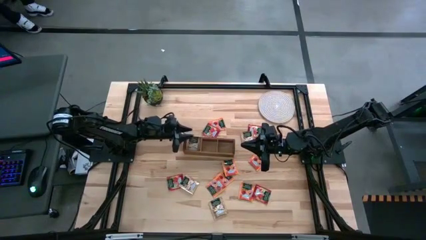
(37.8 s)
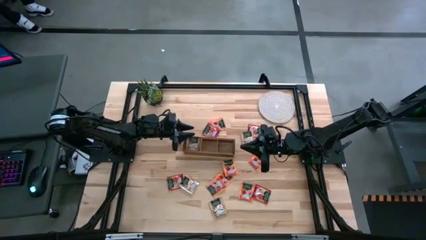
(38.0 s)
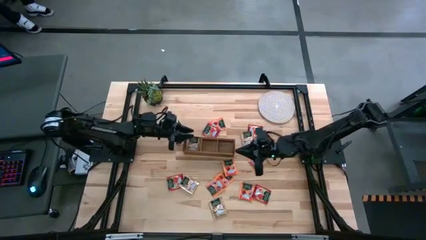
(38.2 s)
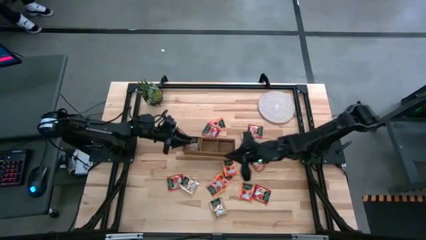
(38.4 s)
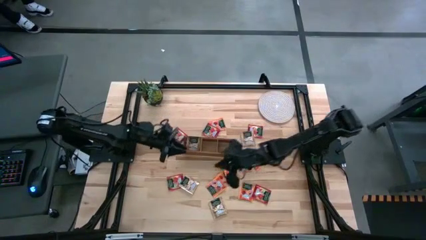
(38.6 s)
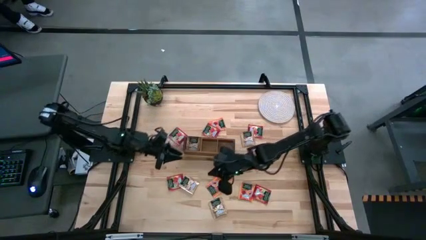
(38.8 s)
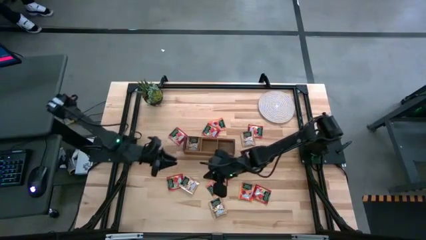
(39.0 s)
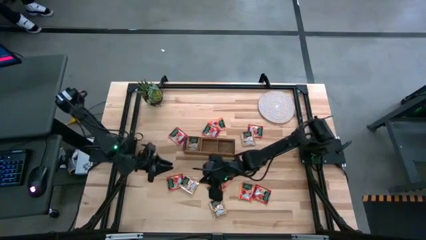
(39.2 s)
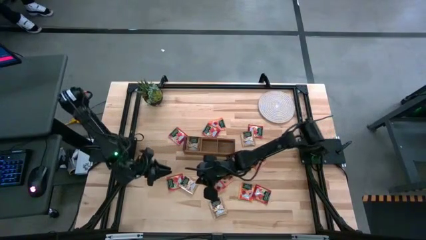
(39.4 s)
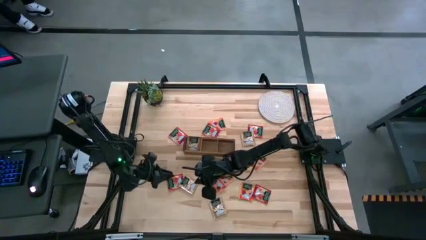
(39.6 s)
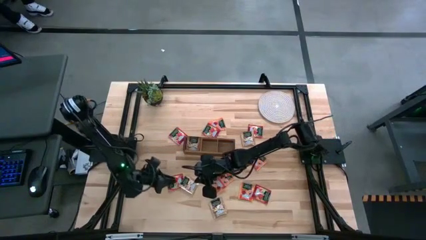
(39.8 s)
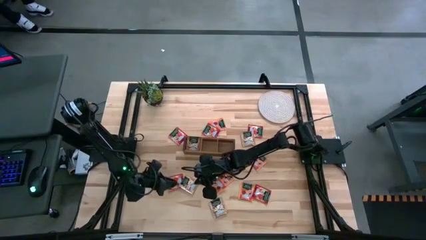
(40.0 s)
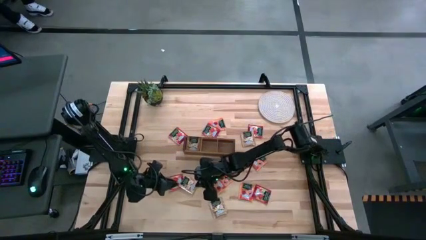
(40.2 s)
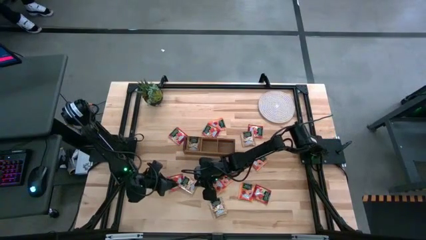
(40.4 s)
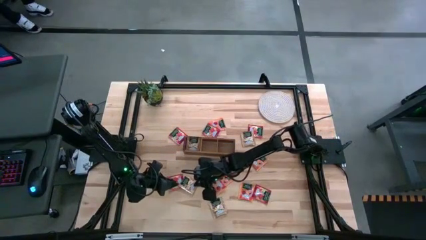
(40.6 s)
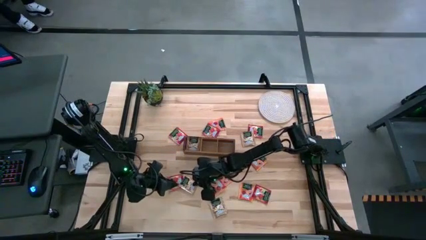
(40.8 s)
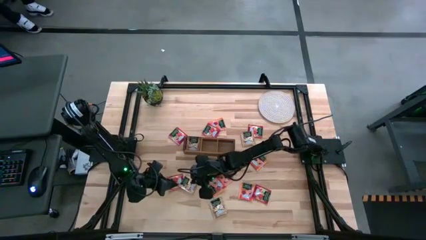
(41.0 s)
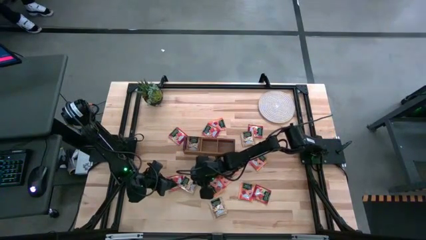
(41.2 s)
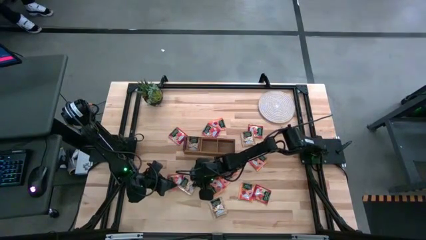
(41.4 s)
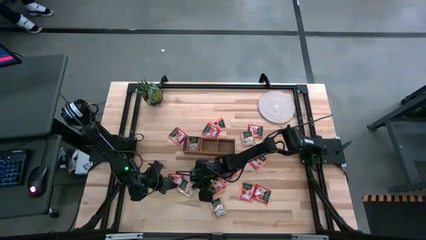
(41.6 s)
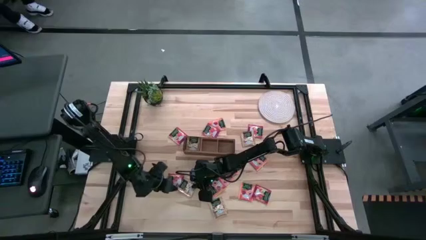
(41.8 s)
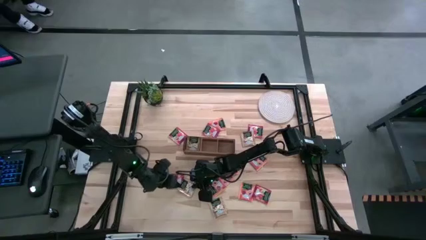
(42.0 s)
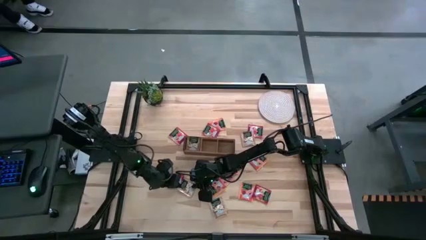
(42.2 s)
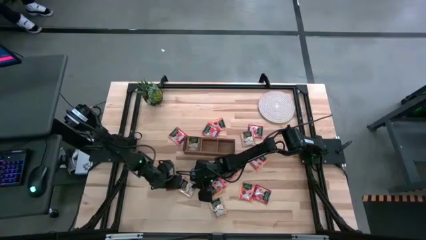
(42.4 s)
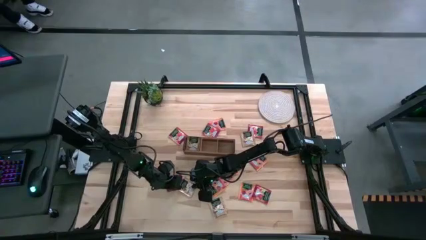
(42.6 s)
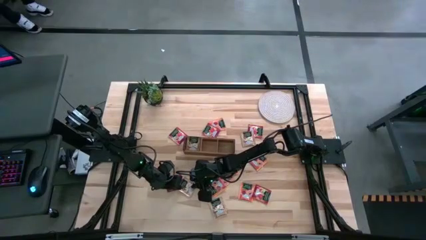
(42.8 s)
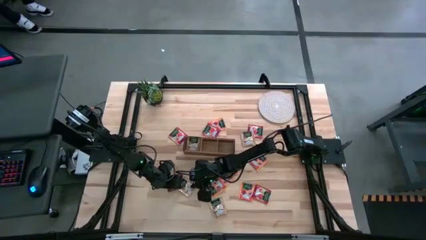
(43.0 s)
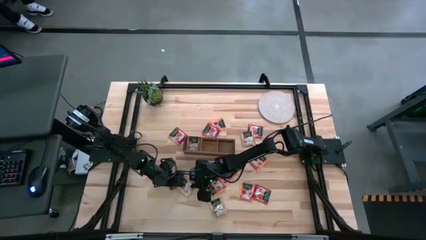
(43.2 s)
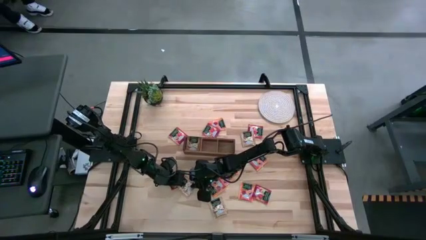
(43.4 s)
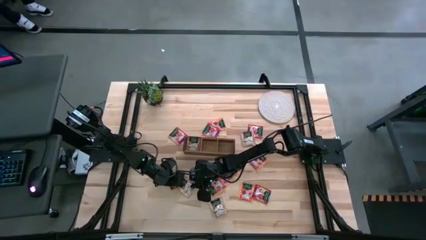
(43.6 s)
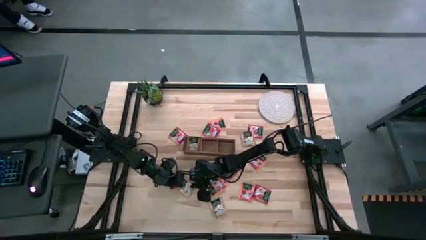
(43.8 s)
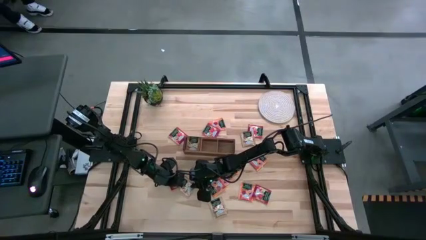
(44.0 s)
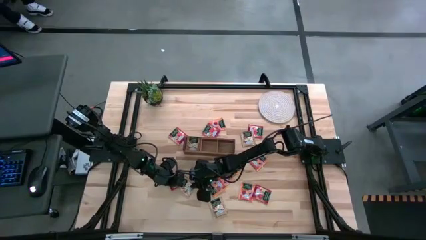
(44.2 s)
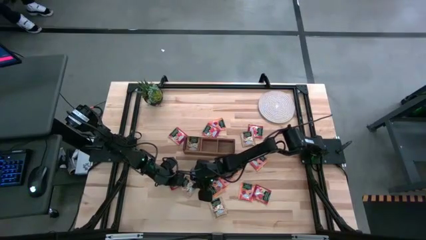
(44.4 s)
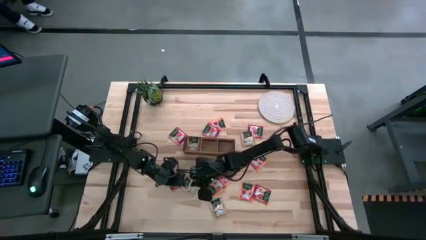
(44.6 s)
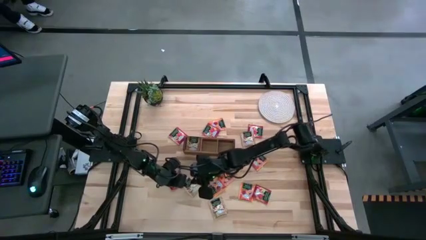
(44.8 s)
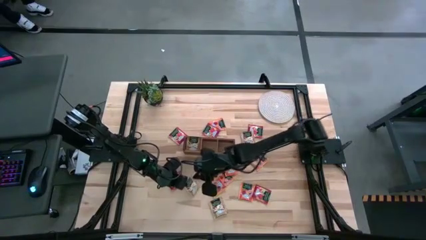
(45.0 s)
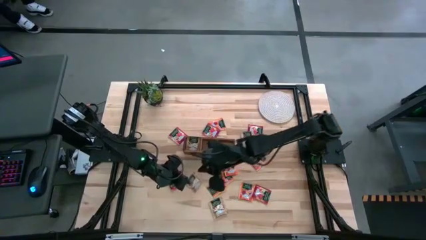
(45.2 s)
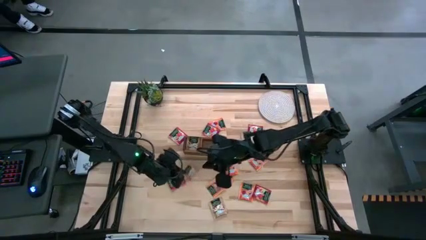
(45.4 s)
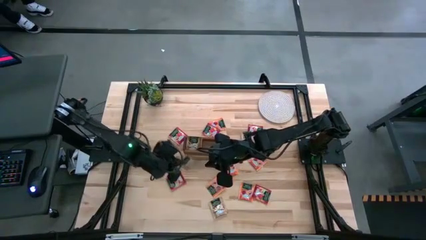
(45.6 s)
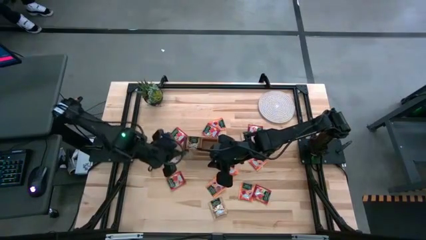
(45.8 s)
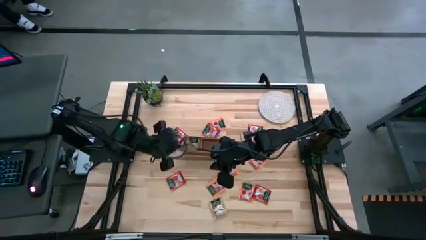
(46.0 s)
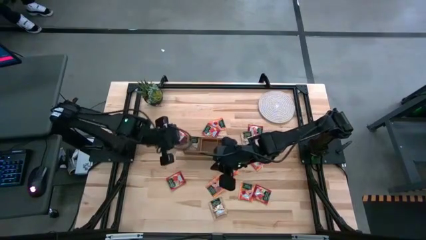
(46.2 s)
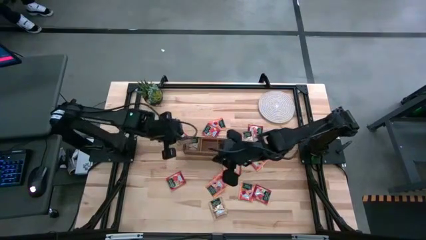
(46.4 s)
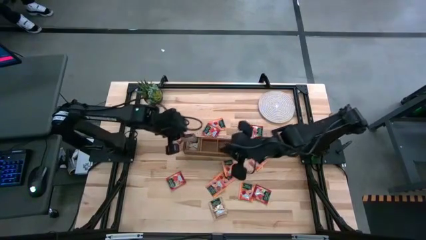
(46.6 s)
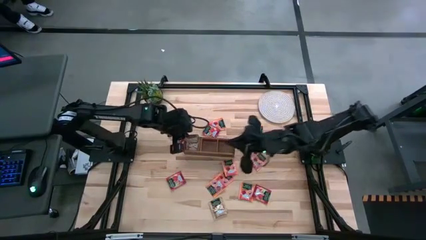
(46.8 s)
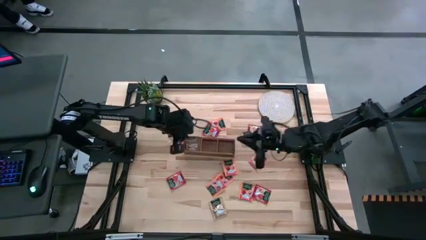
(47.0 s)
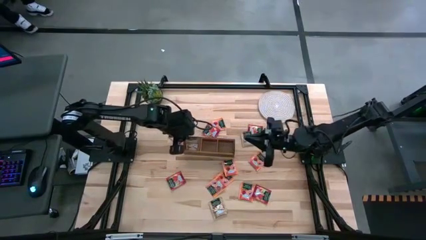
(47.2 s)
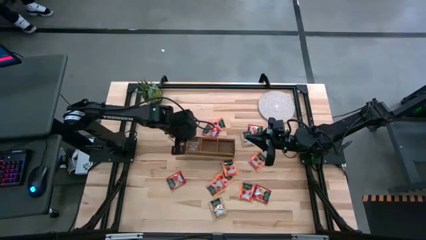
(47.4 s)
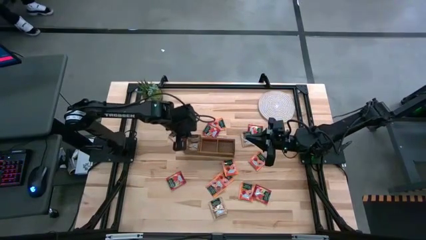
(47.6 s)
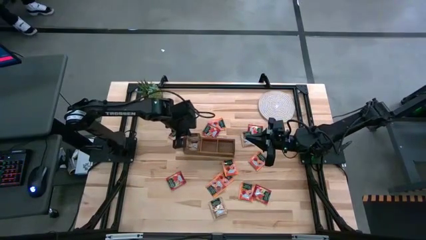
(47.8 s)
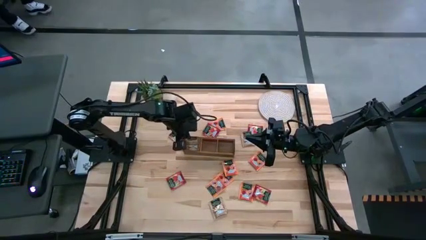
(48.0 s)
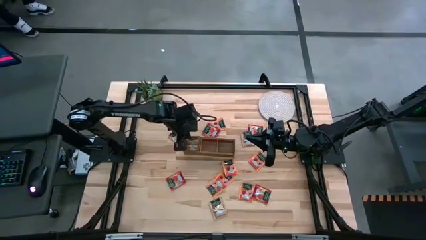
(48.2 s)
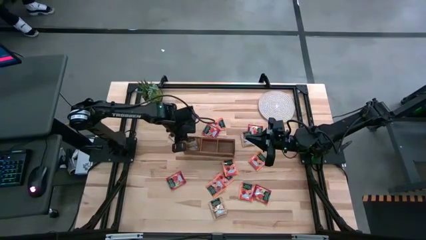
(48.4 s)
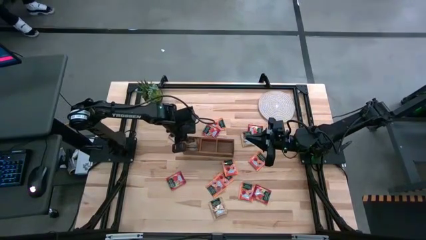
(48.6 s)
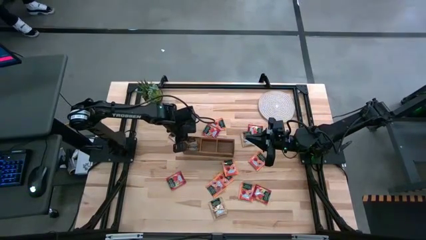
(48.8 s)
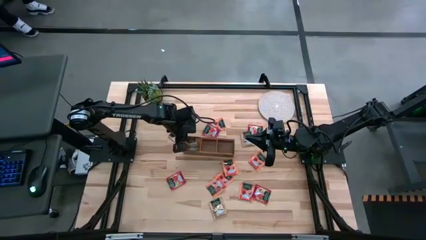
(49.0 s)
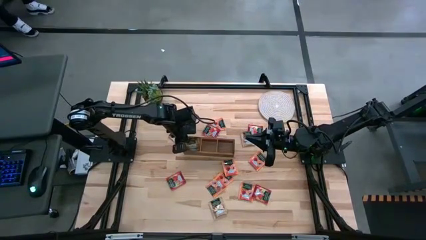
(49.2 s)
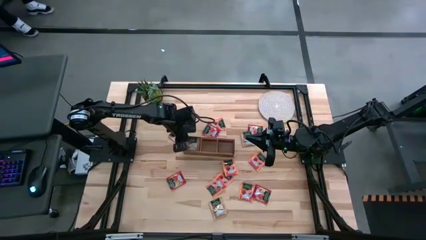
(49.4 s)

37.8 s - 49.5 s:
Task: Pick & Place Tea
Put the brown tea bag into the left section of the brown wooden organizer
